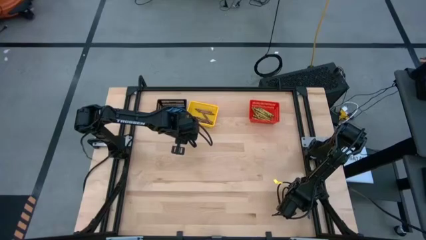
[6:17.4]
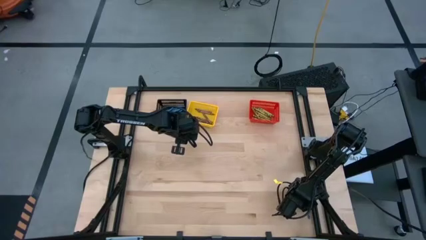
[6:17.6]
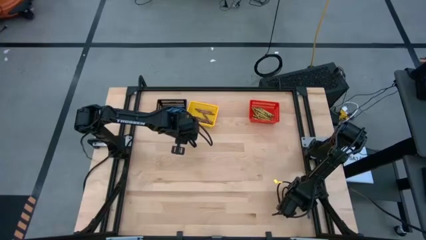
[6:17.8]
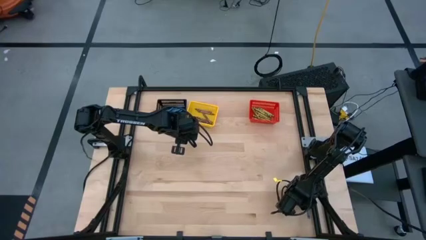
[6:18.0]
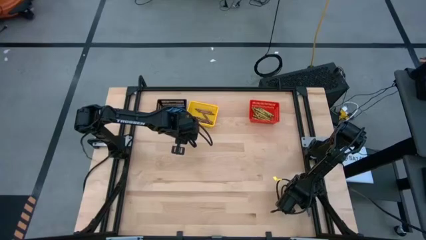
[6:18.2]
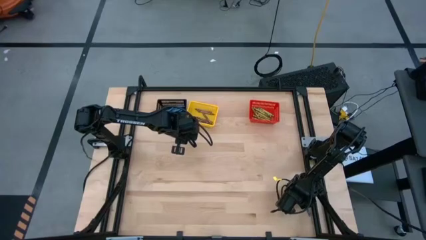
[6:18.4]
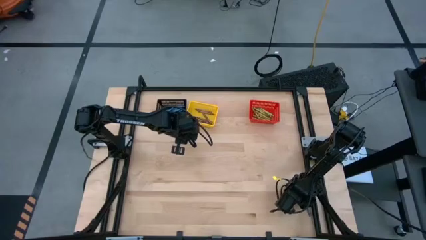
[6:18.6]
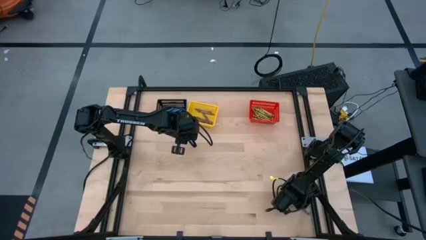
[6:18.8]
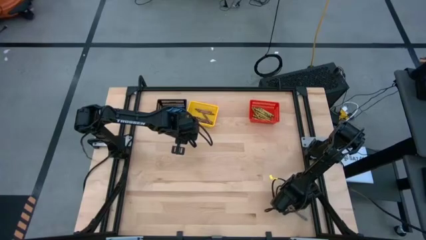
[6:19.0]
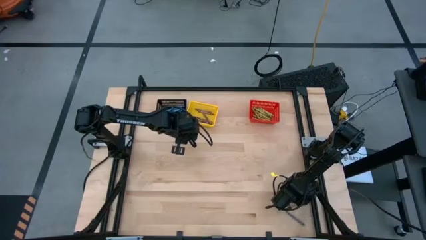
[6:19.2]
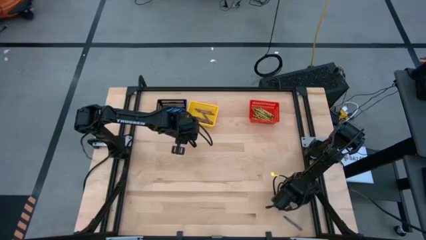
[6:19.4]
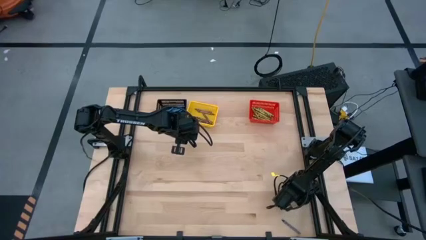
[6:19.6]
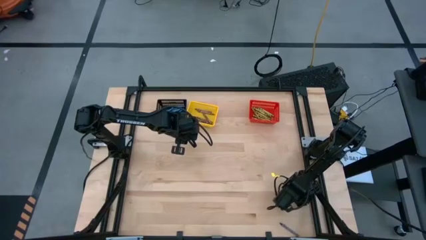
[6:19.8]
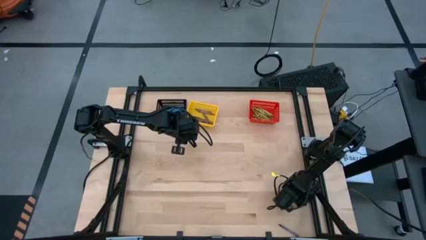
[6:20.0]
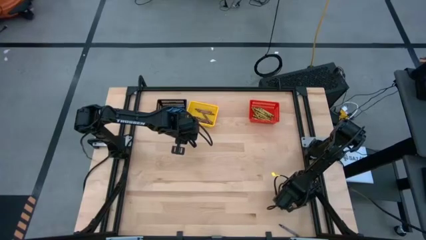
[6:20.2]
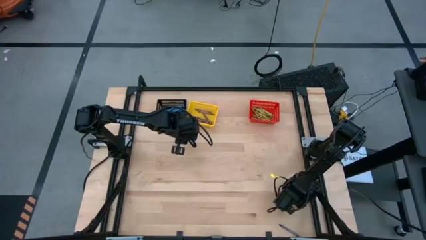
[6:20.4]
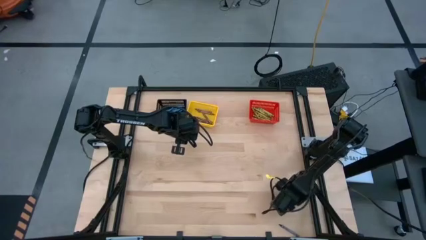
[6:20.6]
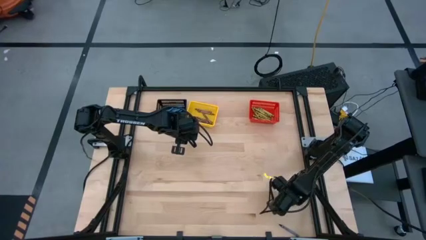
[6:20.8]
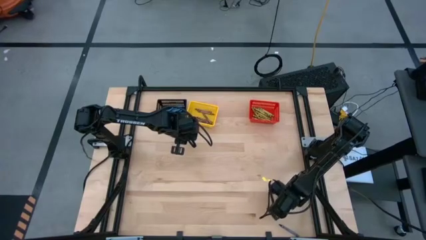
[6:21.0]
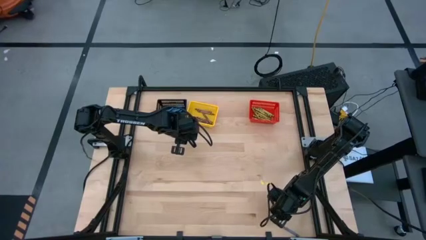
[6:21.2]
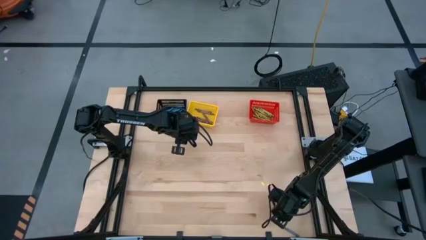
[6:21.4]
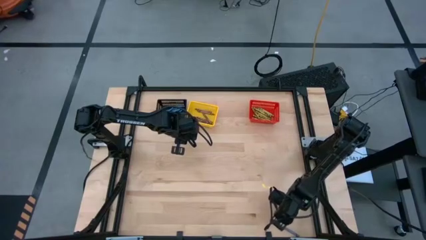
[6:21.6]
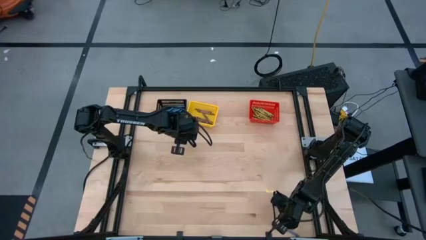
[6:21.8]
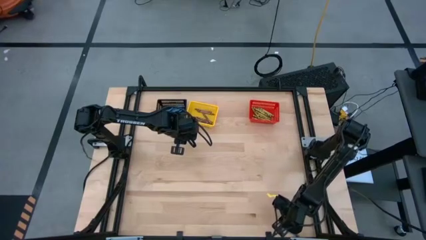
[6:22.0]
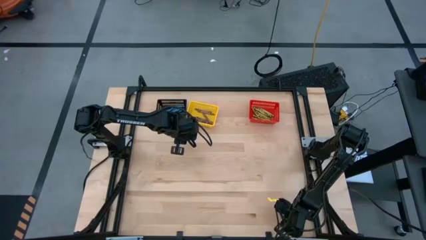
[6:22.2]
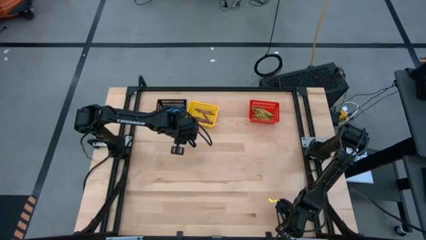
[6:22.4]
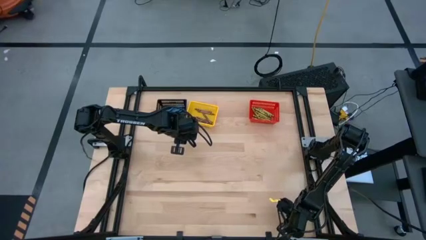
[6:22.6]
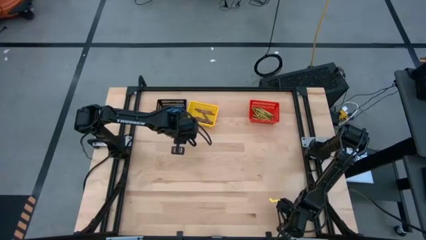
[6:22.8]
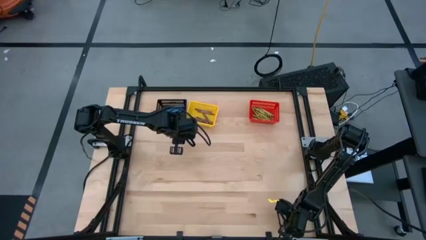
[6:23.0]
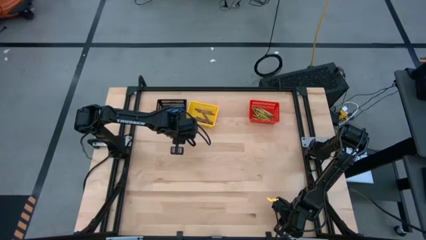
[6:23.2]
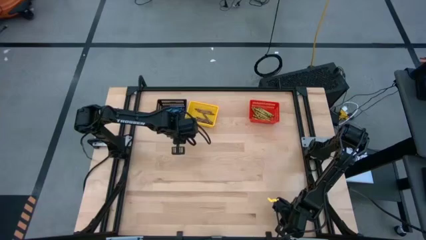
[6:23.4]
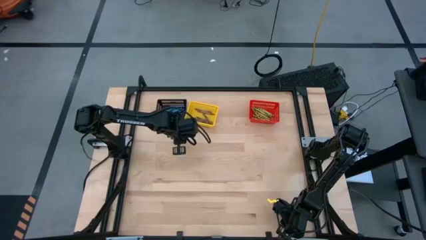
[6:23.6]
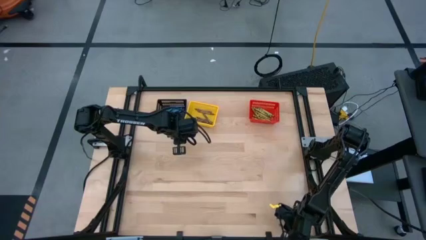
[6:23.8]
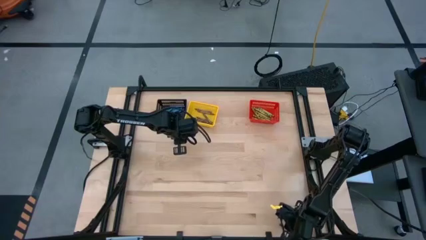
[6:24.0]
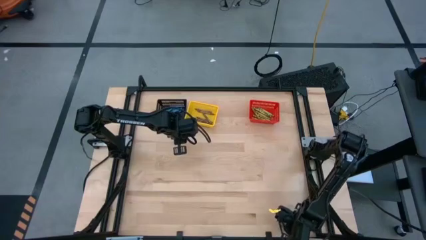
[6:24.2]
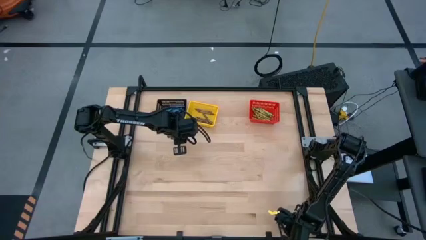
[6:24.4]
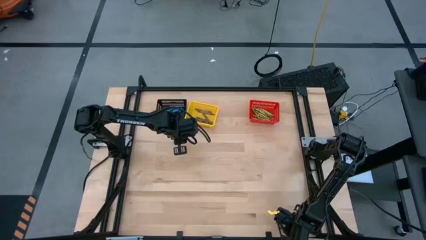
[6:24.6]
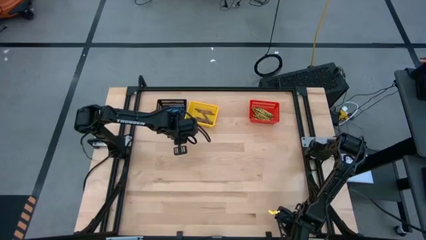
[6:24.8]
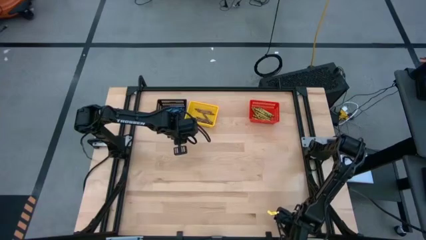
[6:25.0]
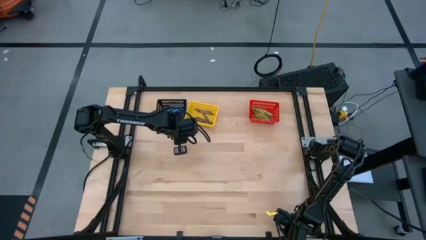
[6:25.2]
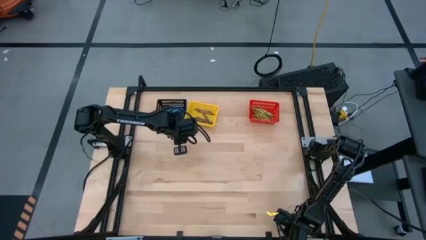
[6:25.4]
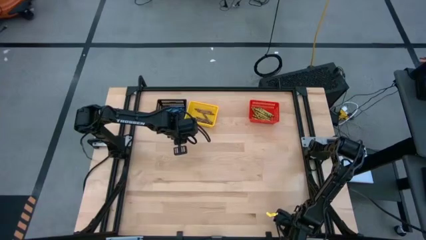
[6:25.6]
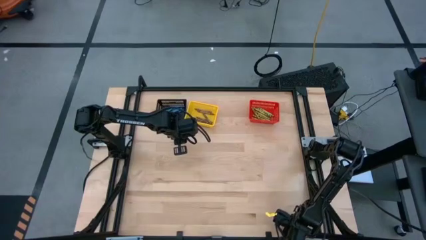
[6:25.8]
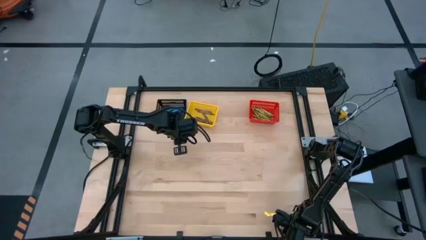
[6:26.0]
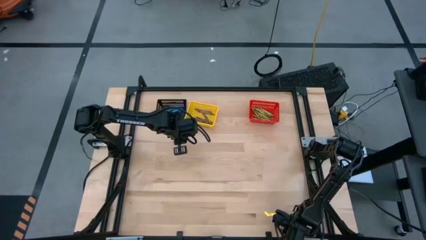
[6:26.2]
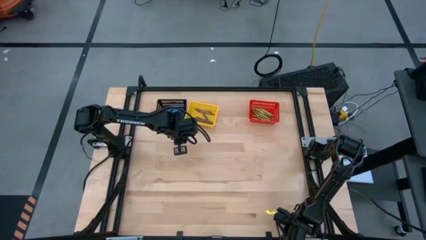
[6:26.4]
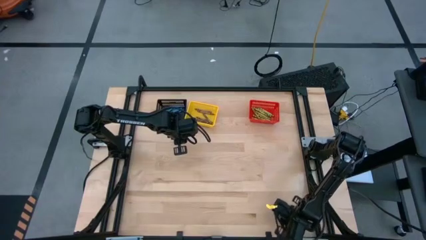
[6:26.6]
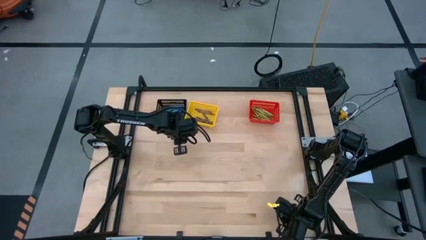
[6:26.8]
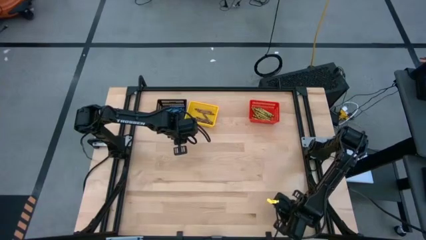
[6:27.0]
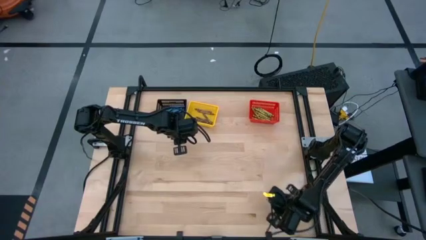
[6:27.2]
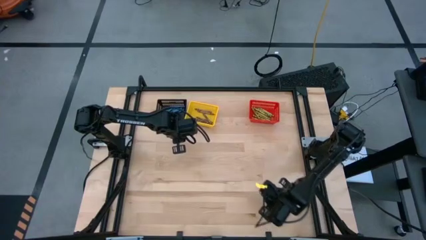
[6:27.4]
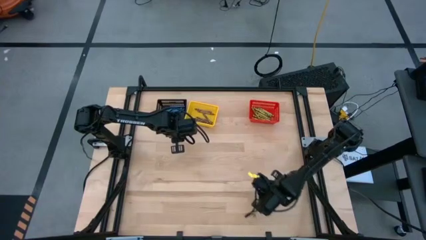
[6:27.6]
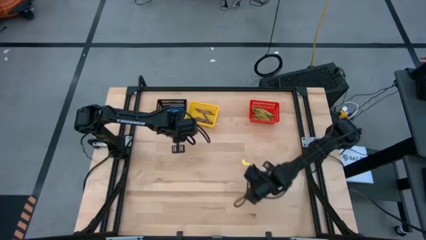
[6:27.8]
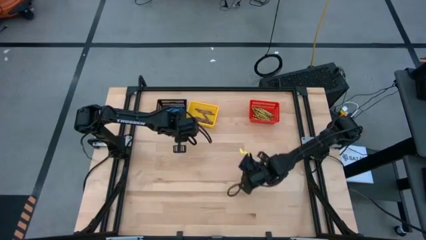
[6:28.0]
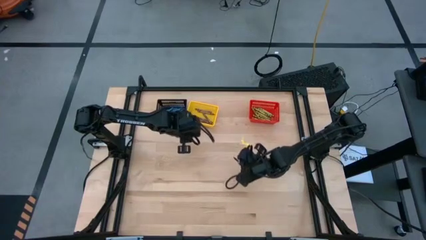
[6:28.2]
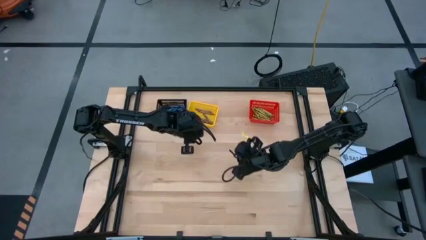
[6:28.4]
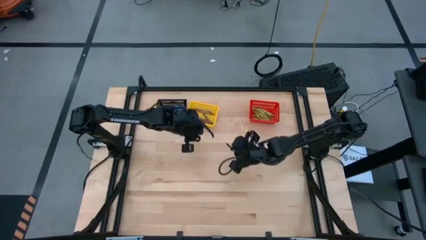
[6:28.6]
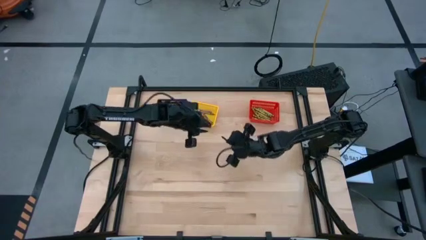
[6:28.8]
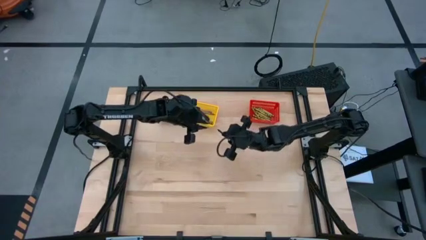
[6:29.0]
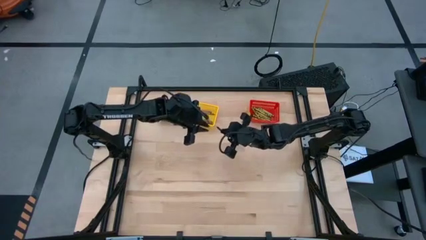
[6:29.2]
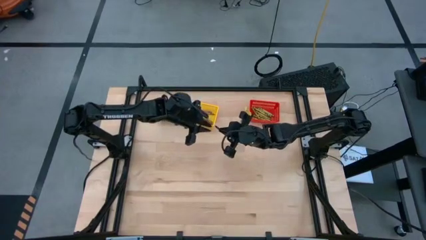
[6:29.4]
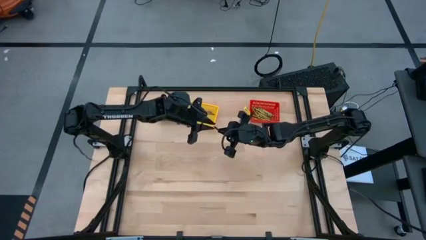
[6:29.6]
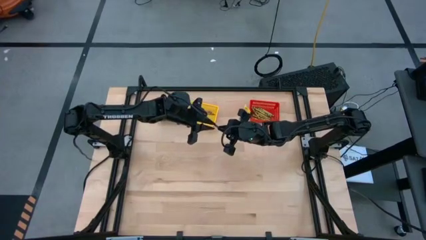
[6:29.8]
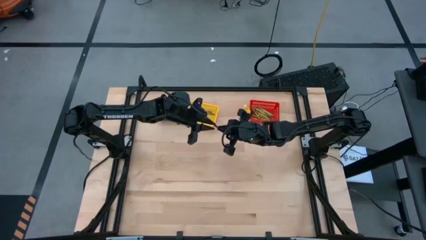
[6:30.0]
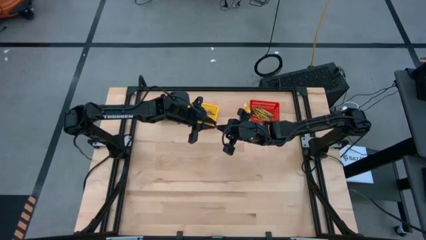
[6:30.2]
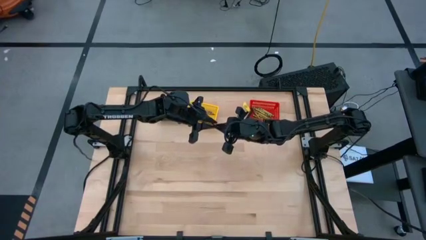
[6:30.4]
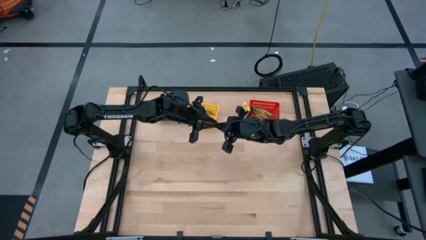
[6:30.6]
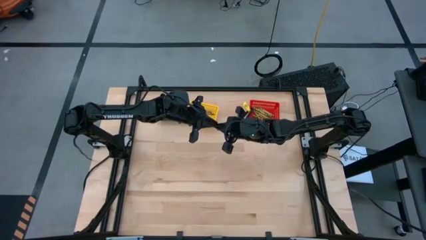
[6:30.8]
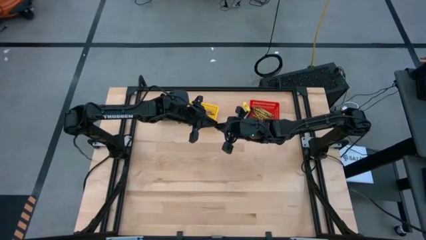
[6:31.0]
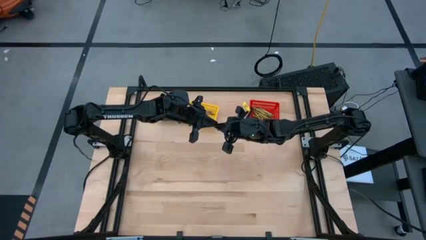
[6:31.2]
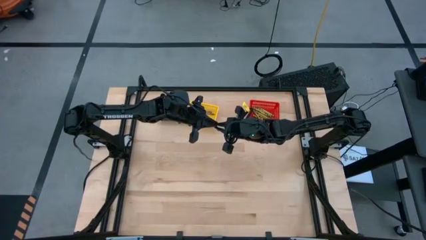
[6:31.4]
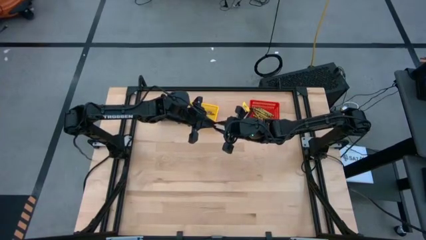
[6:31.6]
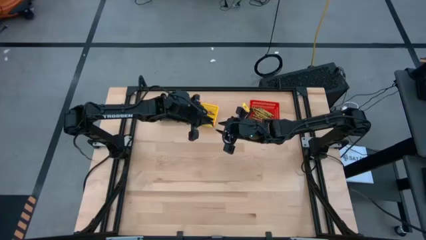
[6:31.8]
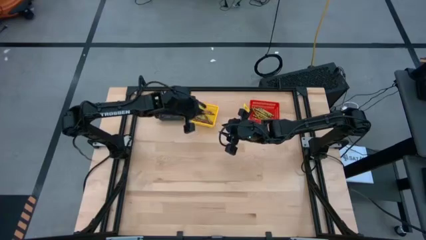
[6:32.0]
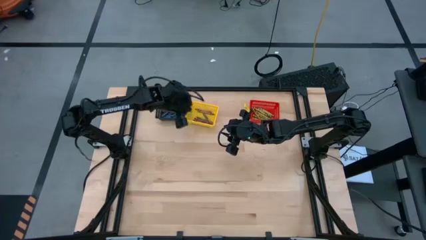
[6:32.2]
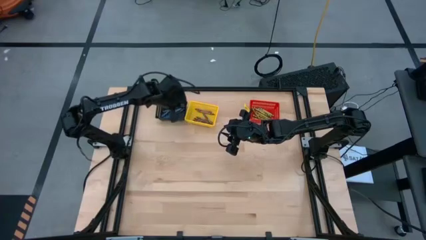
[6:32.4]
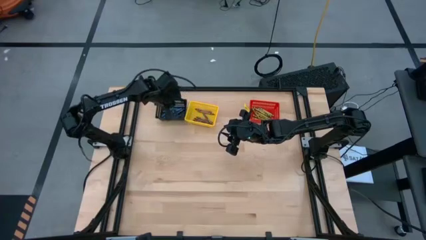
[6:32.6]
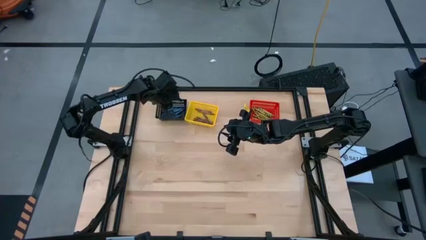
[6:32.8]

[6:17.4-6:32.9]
Task: Sort crayons
Put the blue crayon into the black bin
